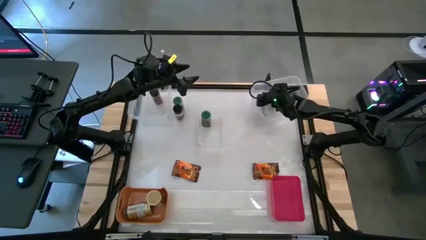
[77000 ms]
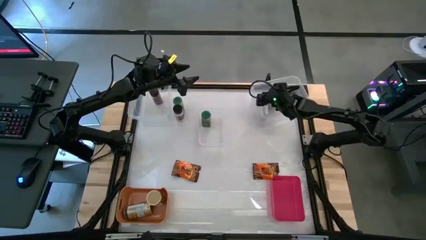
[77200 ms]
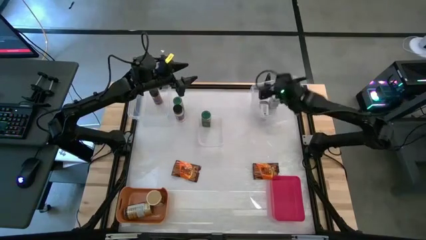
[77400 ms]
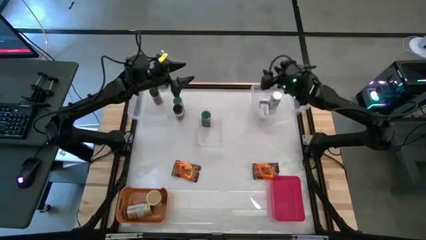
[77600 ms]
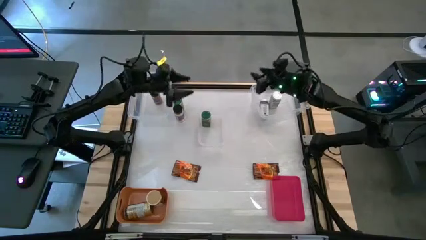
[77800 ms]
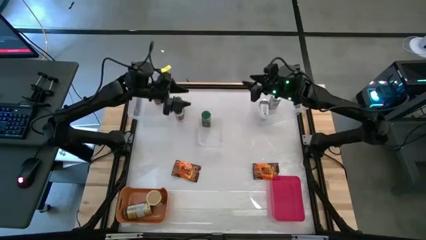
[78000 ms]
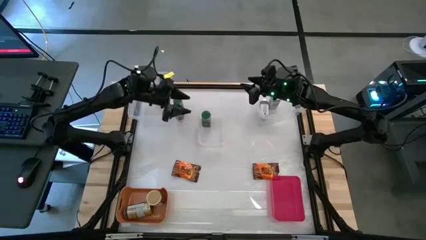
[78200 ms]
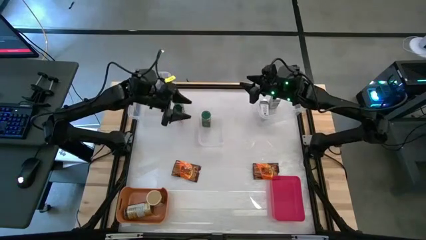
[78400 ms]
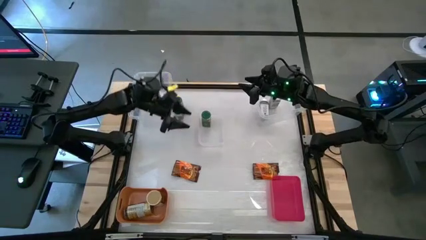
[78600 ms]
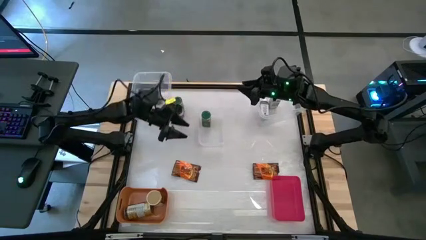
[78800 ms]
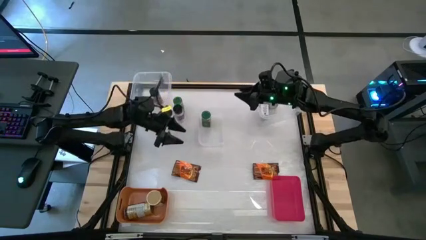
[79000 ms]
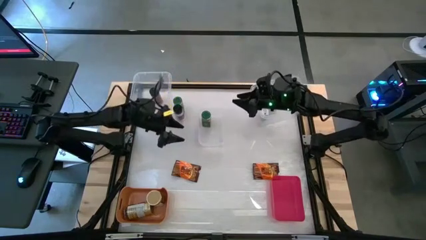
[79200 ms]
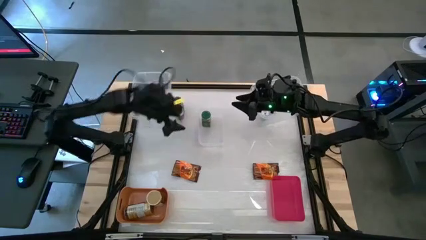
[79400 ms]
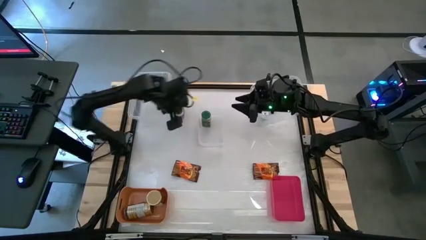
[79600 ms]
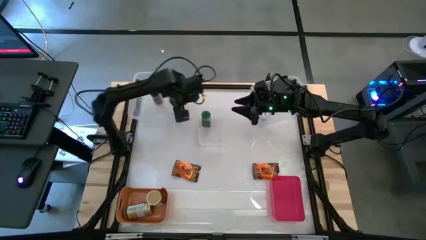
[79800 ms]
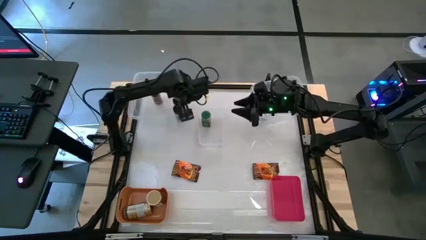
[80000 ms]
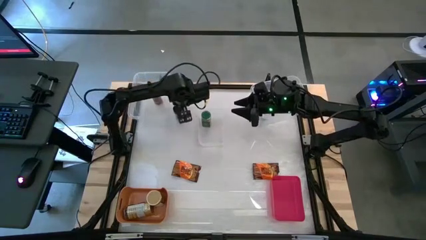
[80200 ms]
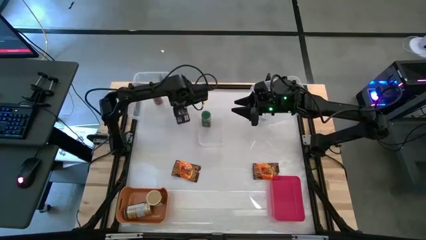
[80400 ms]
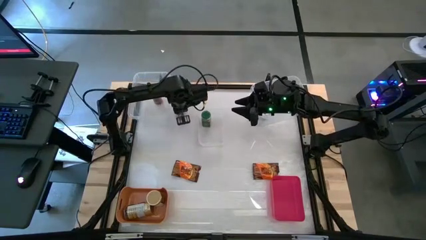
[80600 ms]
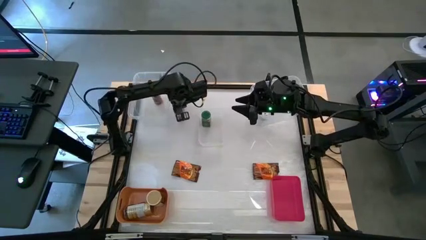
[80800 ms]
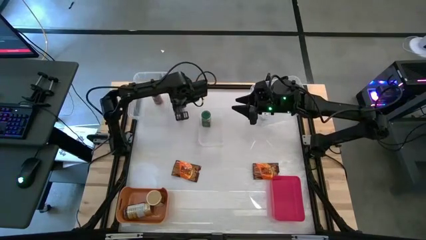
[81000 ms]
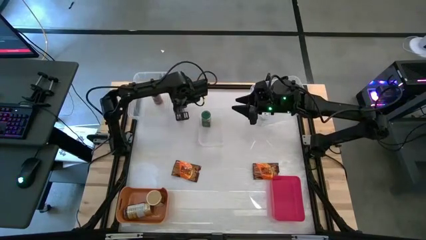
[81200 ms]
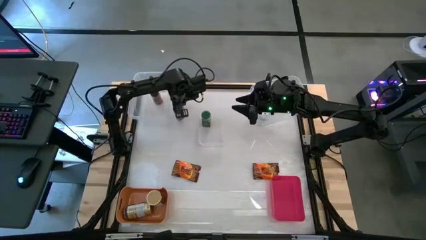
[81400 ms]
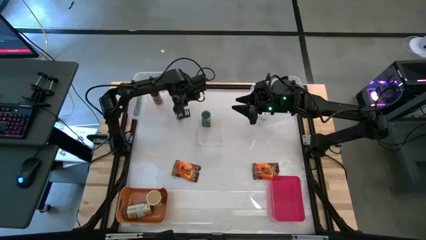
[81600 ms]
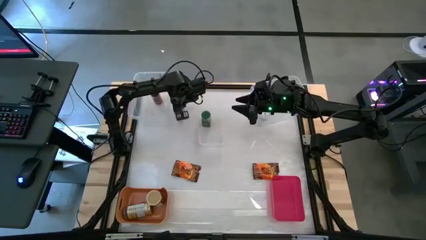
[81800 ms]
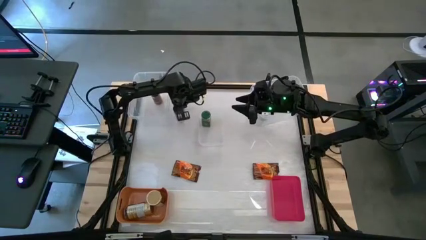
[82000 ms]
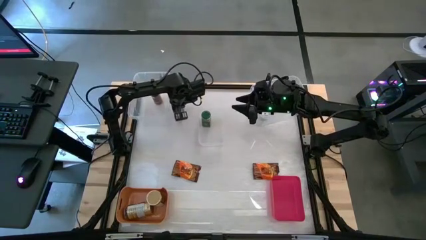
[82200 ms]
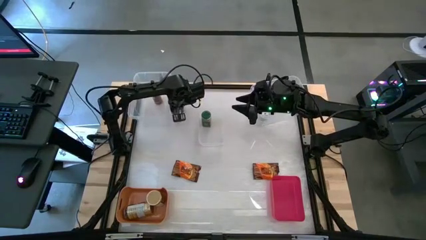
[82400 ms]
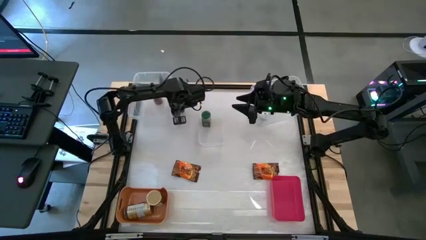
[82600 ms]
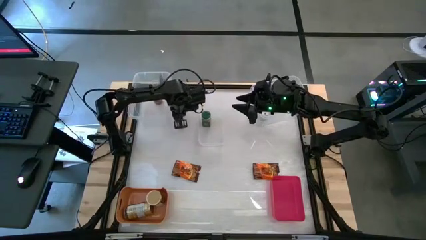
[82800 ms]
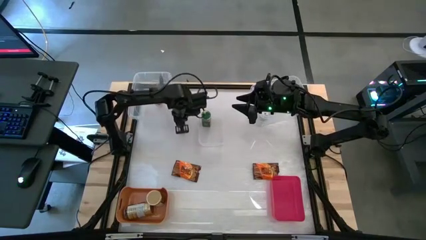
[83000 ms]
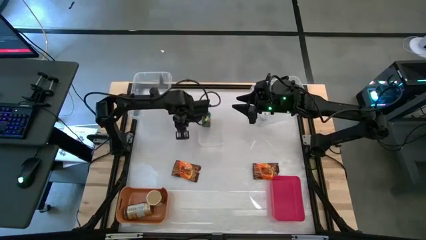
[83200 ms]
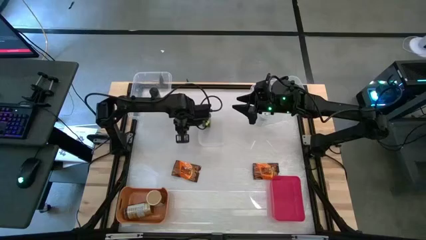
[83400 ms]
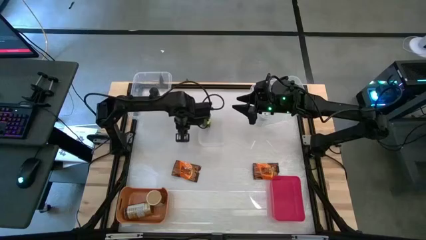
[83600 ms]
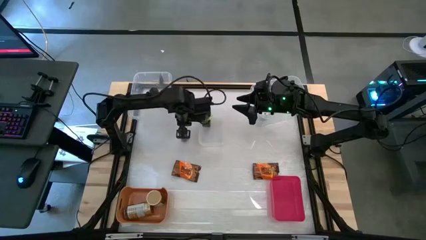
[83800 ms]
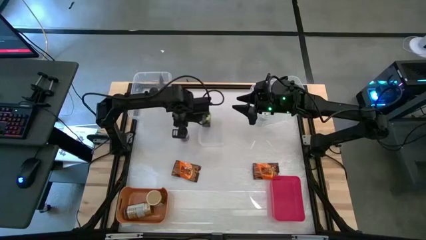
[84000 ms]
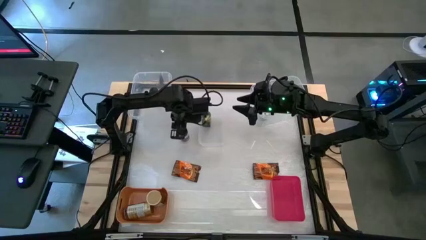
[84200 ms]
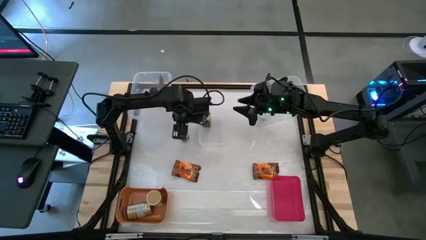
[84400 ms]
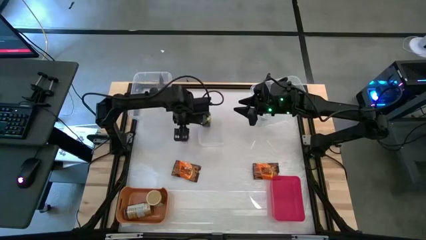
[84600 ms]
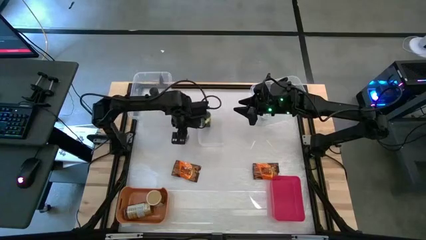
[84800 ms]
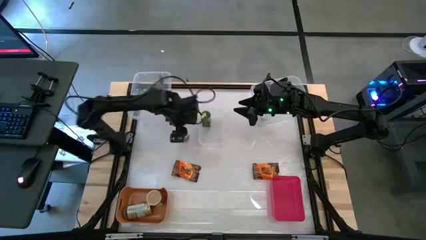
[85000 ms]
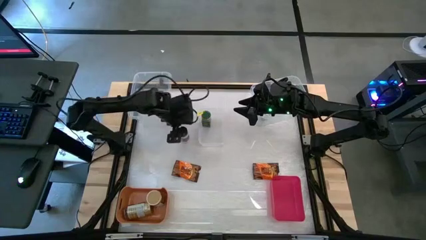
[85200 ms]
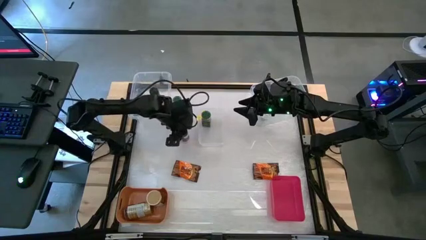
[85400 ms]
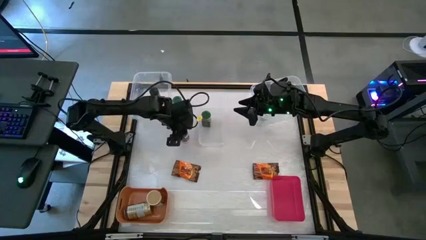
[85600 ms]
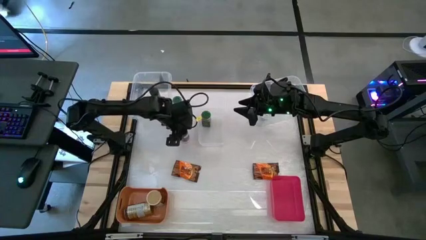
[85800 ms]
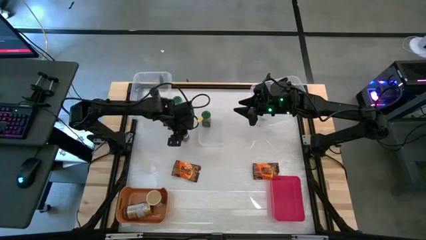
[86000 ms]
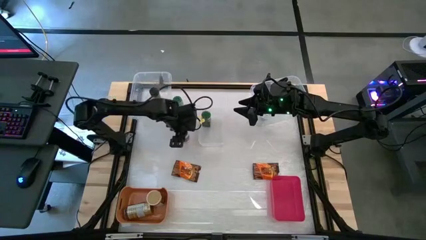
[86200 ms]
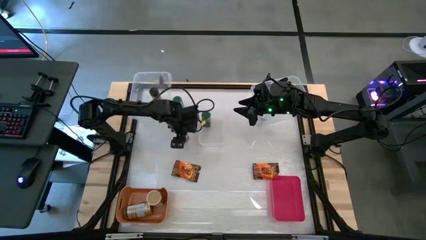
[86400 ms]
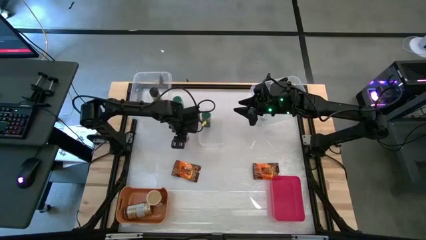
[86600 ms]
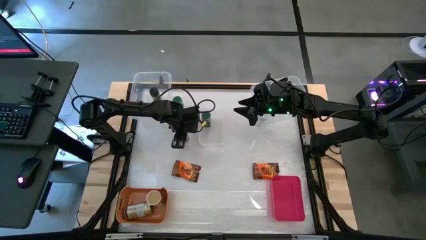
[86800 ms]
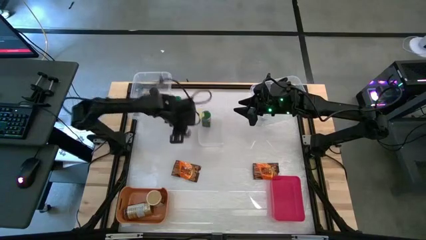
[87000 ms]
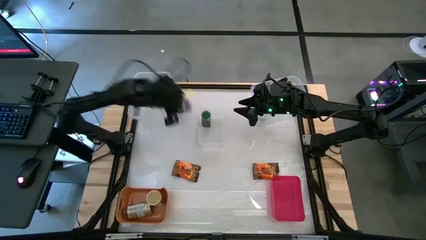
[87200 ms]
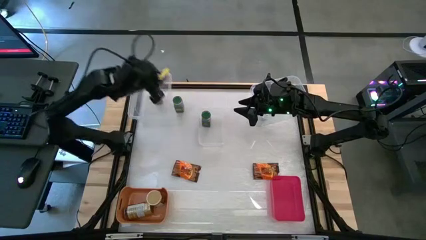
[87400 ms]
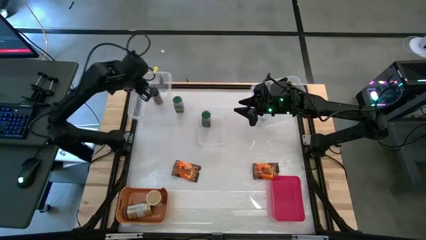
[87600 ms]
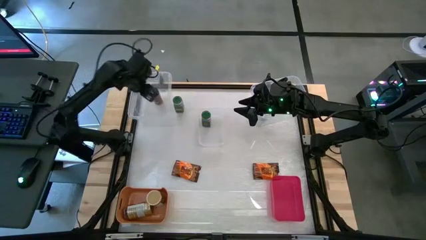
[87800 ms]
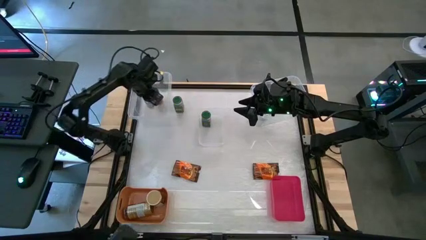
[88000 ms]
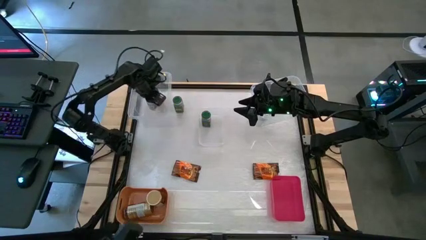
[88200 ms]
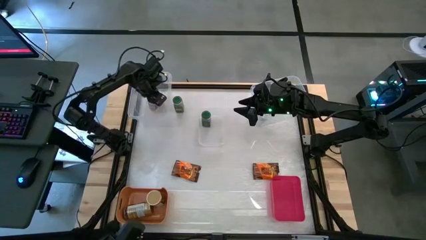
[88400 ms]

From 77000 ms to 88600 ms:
Task: Sort spices by type
Put the black seasoning bottle into the left large transparent bin

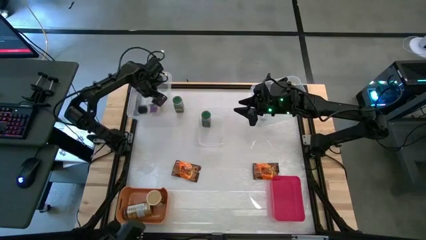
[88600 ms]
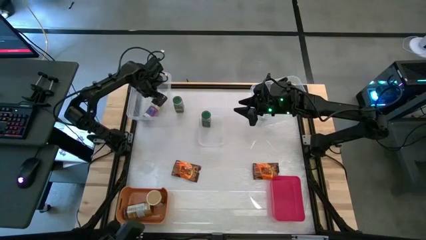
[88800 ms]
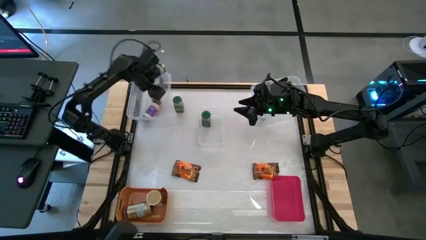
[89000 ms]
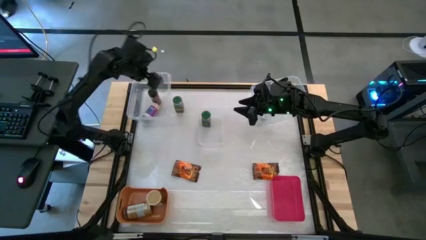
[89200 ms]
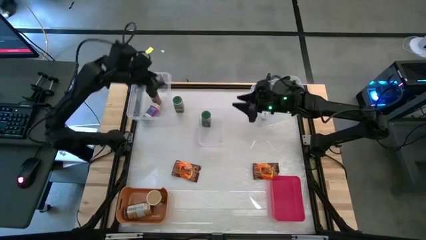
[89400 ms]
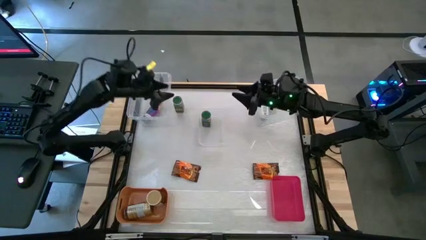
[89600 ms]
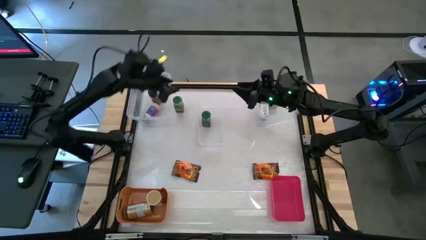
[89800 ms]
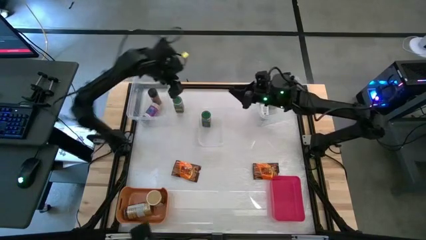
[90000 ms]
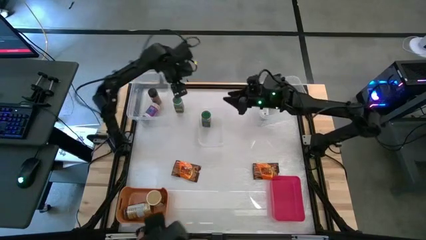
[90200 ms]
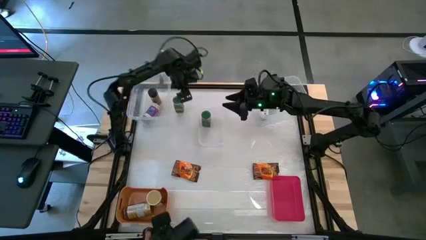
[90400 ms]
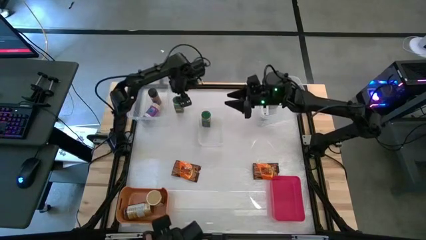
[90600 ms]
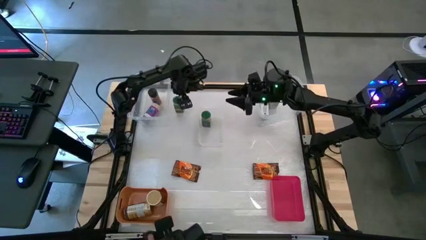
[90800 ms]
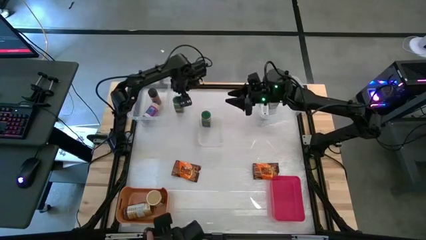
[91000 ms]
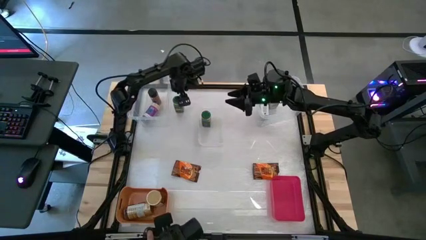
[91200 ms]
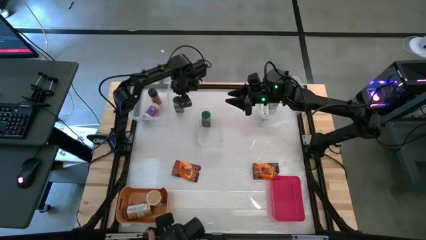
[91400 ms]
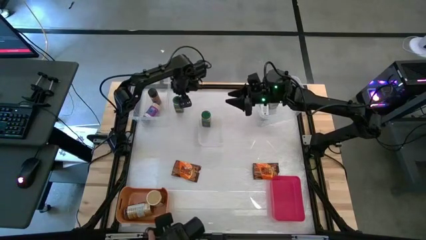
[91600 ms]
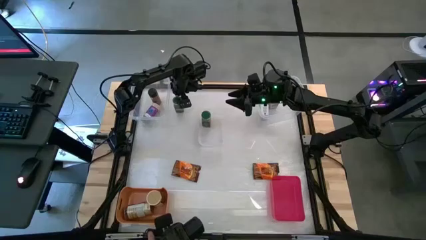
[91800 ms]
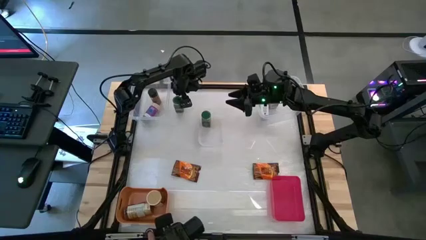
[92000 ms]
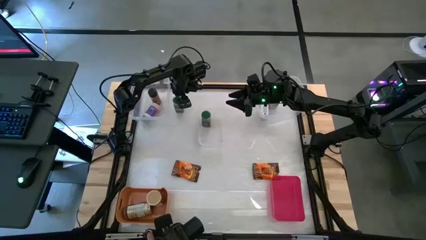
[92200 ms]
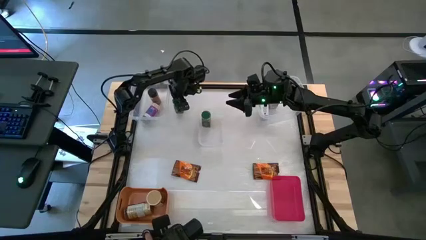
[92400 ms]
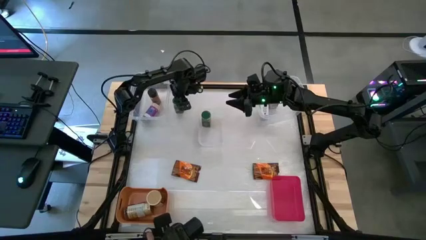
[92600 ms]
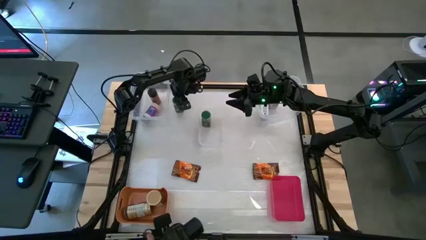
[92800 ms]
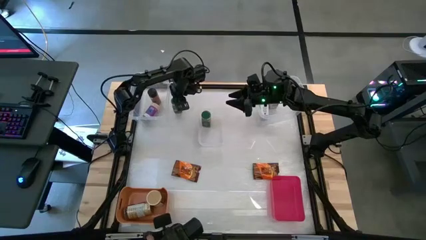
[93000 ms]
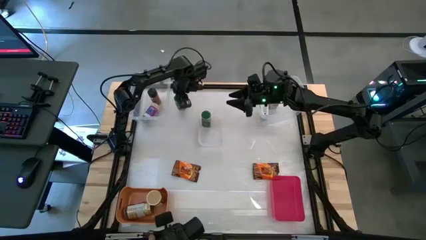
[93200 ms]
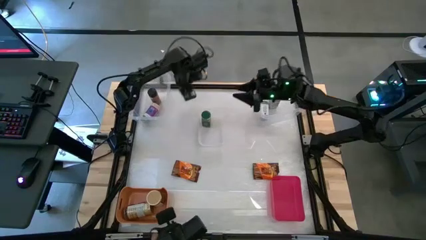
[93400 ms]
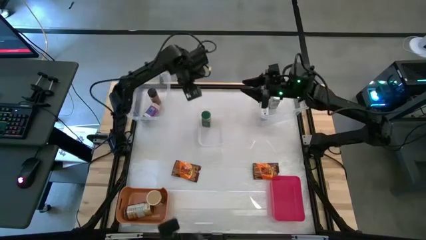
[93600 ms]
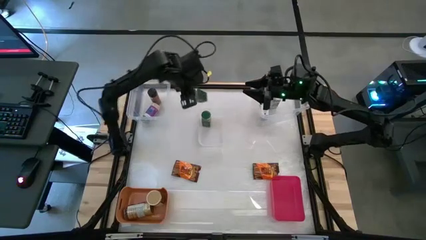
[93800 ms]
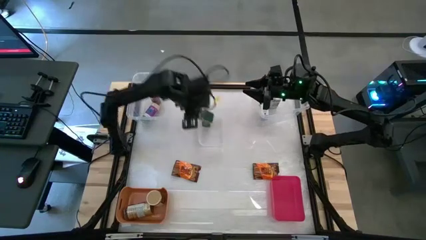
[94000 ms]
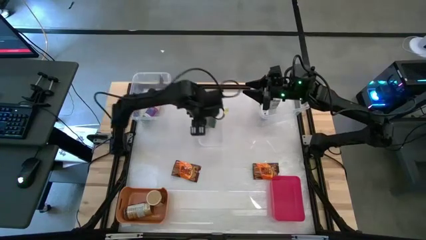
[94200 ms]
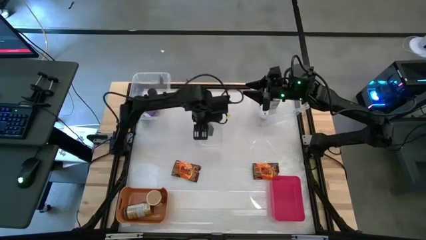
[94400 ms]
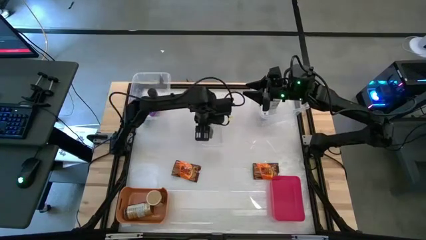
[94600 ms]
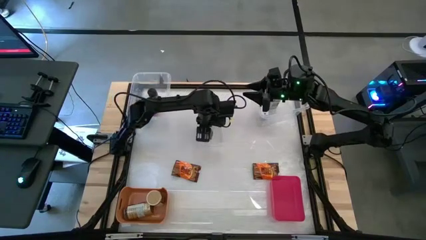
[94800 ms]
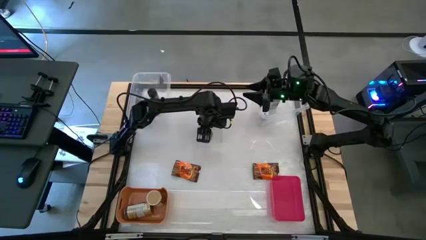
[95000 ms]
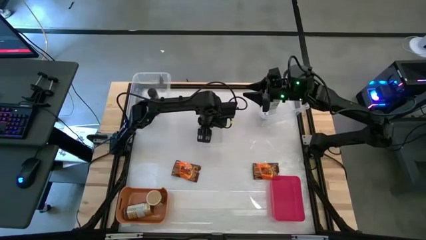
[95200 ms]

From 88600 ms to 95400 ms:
Put the green seasoning bottle into the small transparent bin
